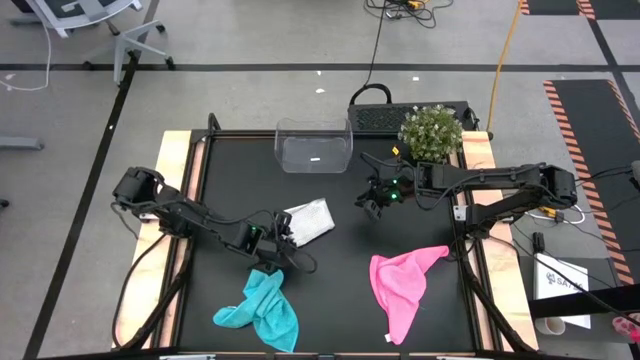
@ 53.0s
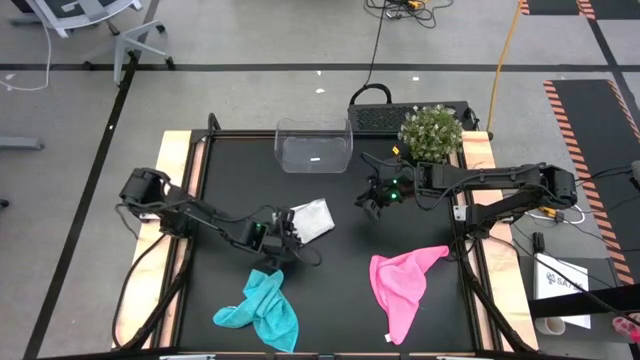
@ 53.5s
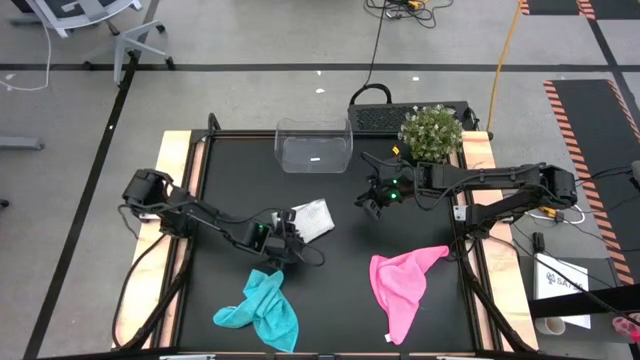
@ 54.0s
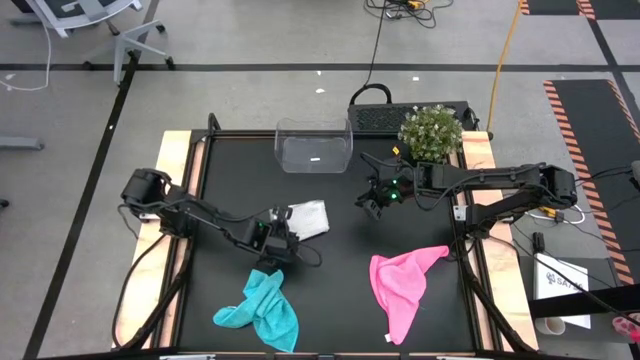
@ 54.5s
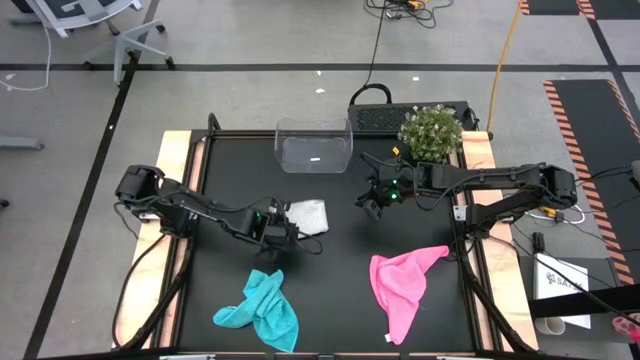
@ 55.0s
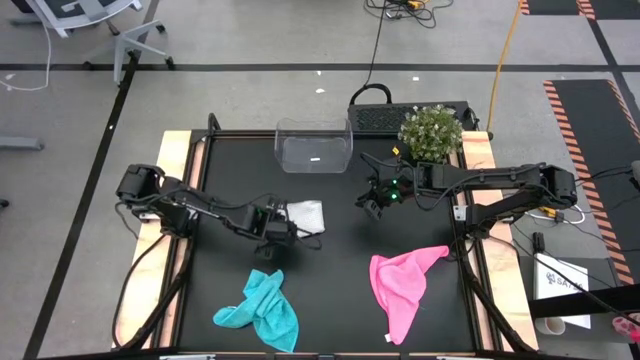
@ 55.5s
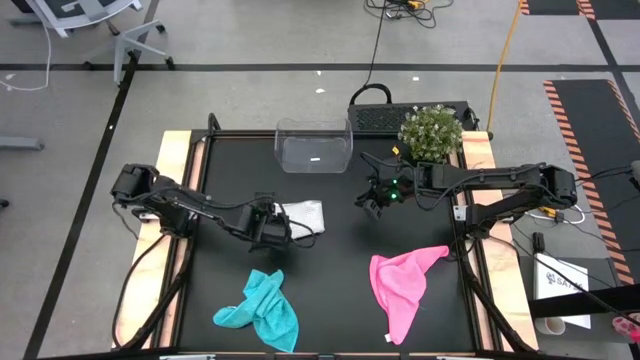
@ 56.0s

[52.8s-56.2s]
Task: Fold microfiber towels
Fold the gray microfiber cloth

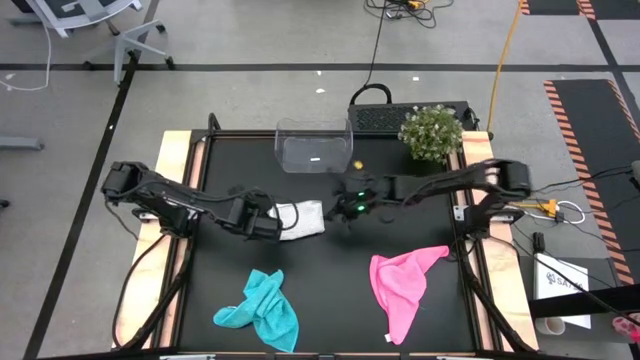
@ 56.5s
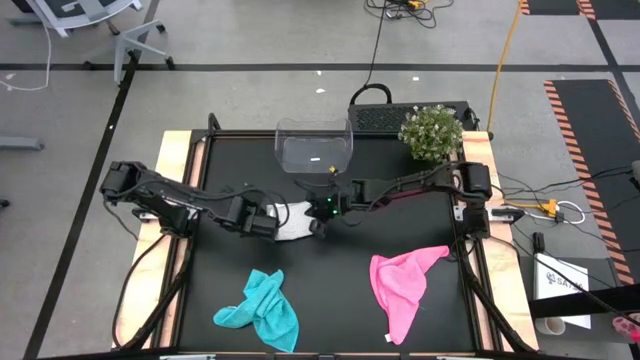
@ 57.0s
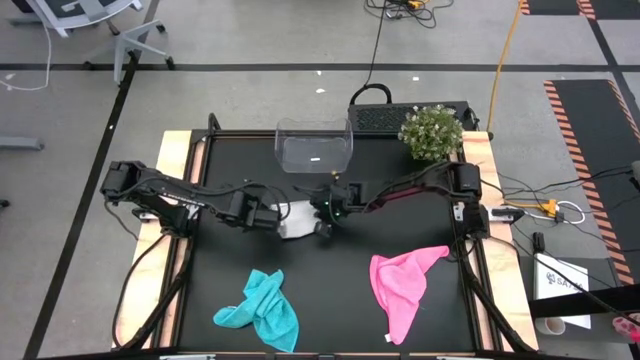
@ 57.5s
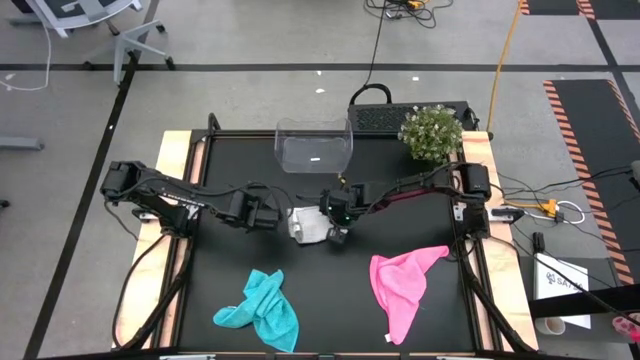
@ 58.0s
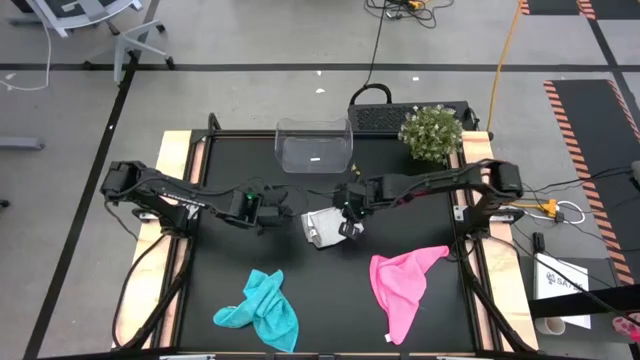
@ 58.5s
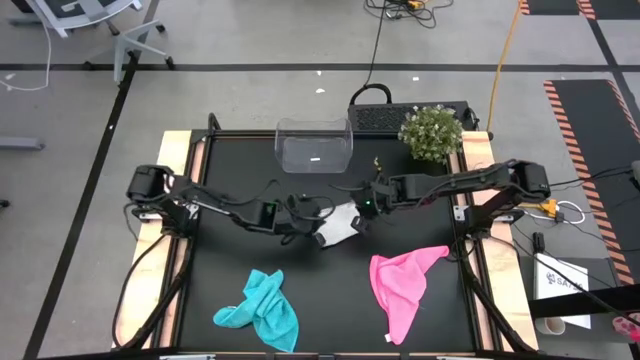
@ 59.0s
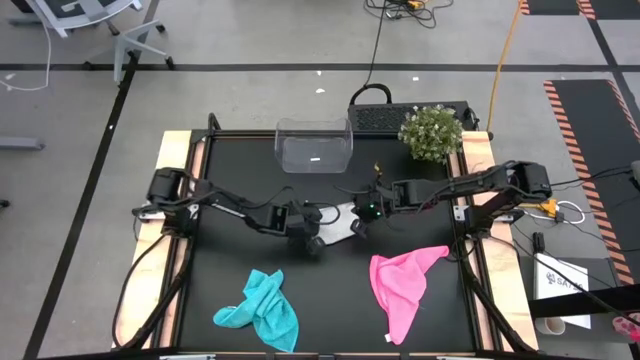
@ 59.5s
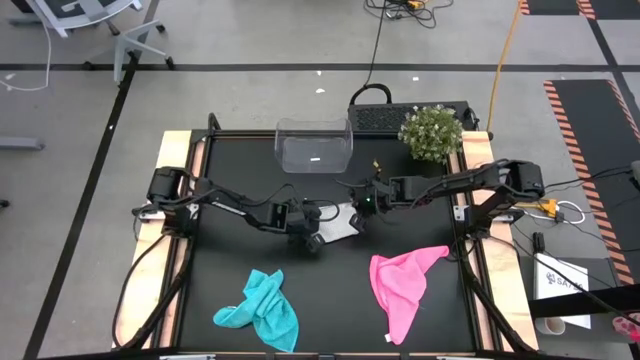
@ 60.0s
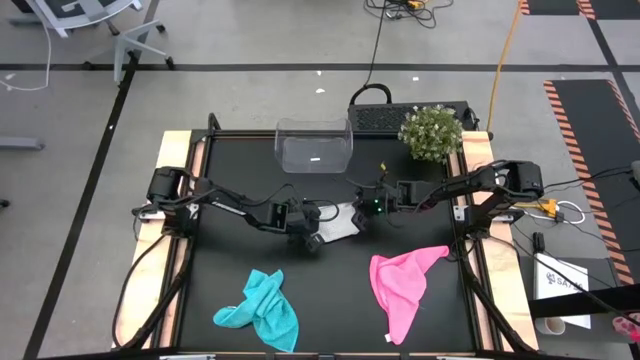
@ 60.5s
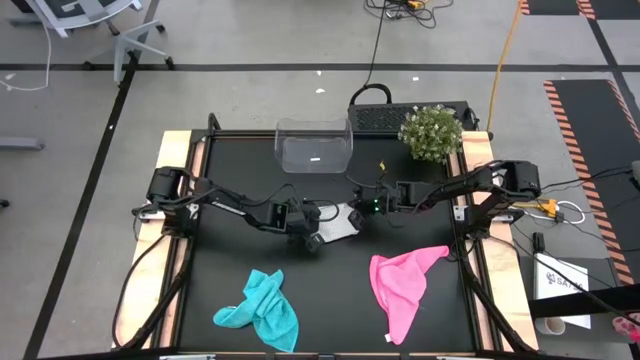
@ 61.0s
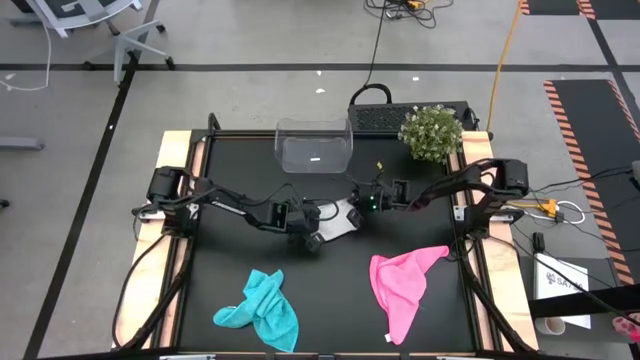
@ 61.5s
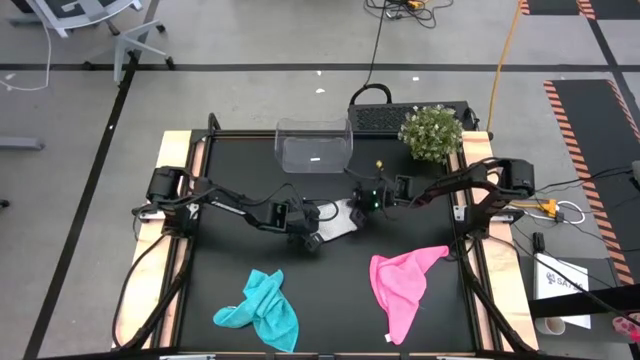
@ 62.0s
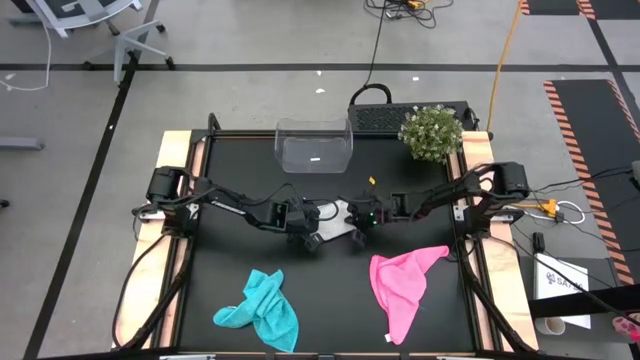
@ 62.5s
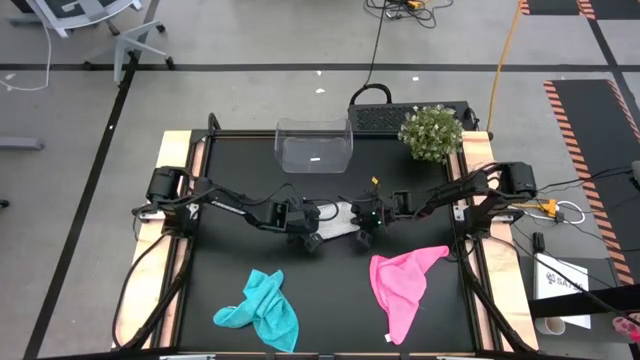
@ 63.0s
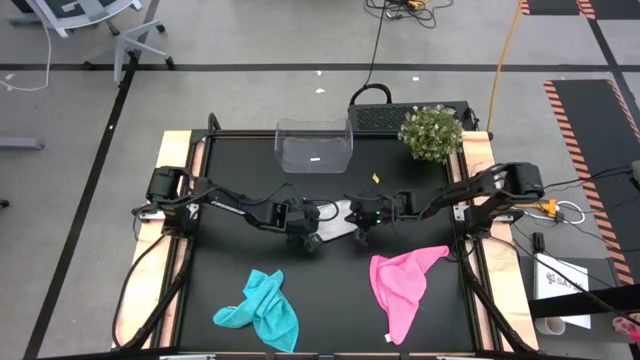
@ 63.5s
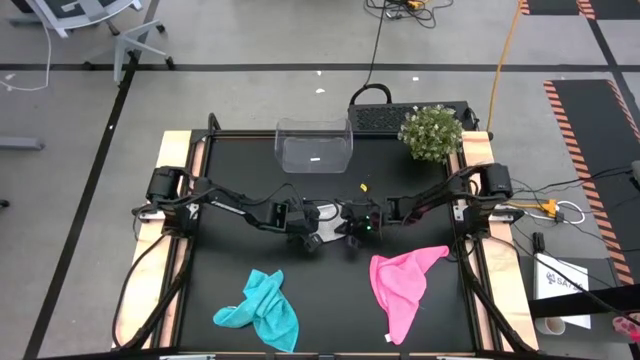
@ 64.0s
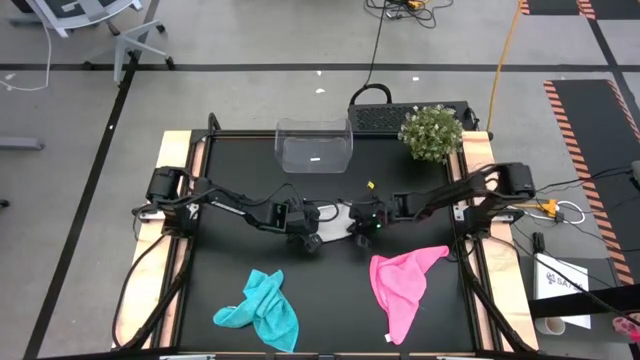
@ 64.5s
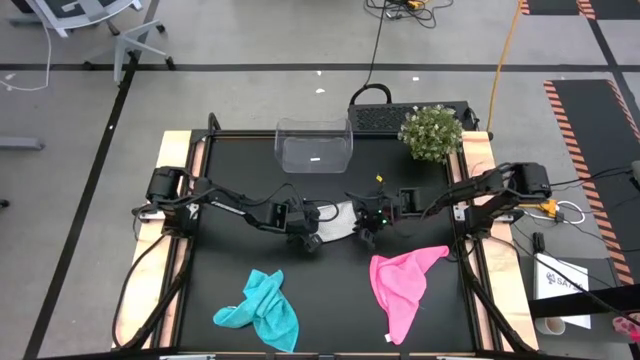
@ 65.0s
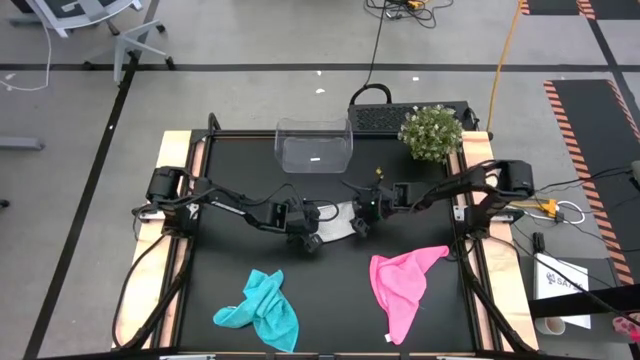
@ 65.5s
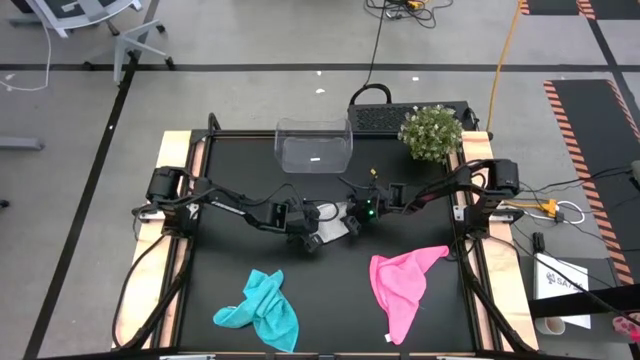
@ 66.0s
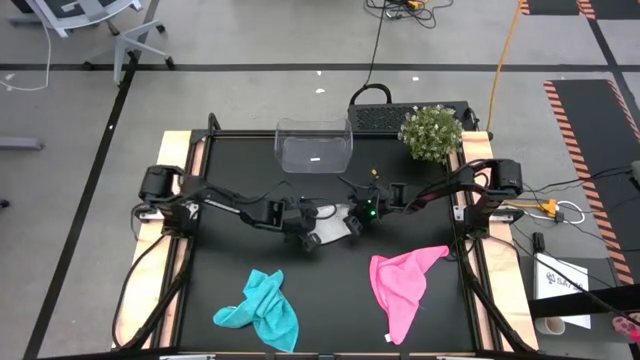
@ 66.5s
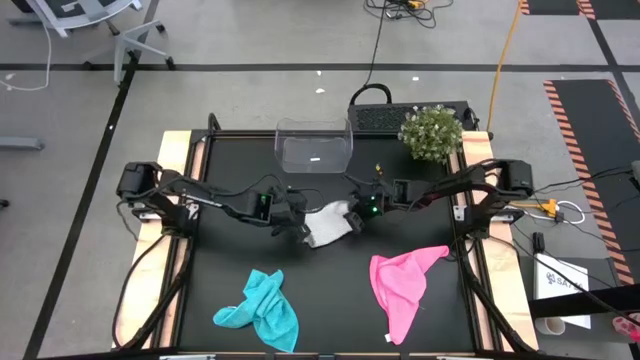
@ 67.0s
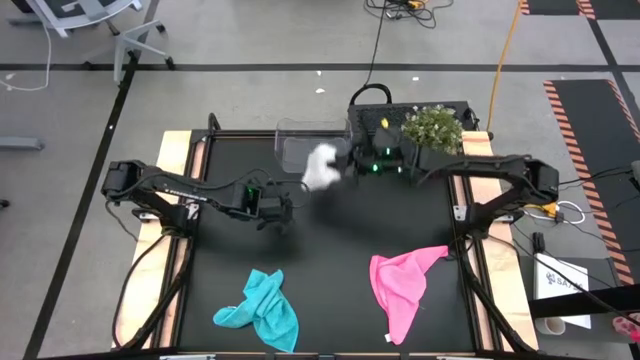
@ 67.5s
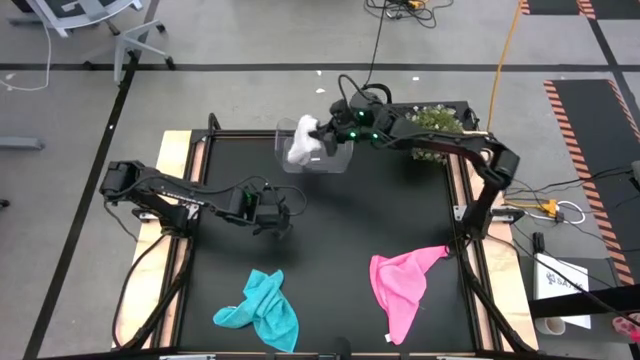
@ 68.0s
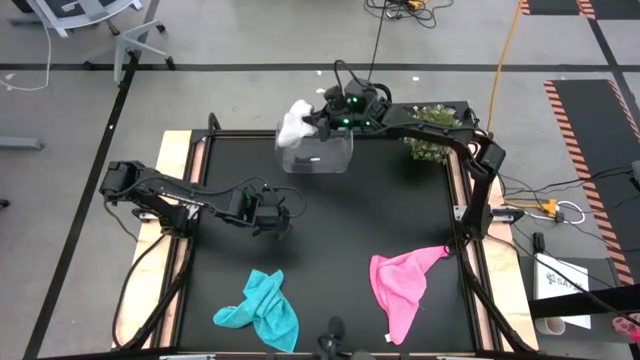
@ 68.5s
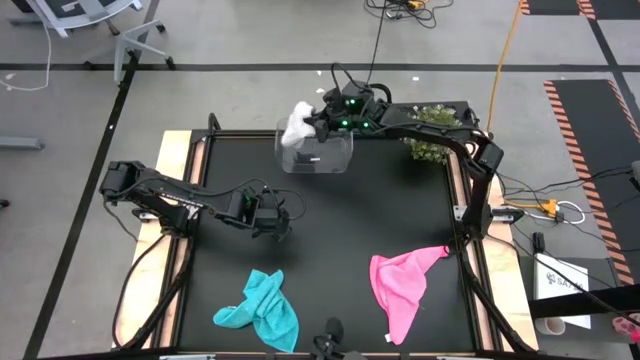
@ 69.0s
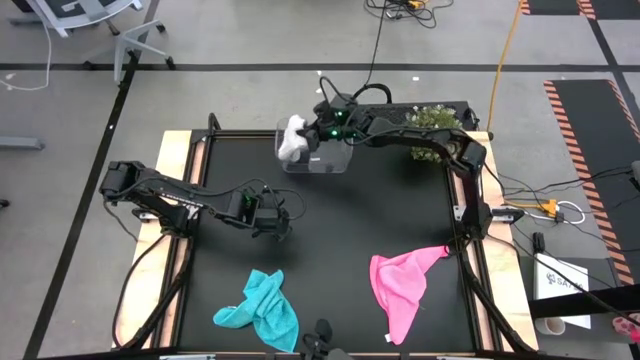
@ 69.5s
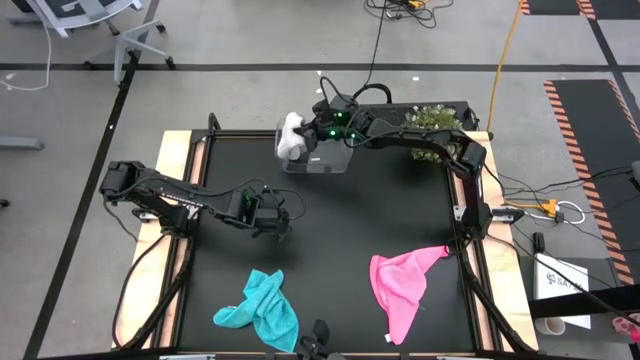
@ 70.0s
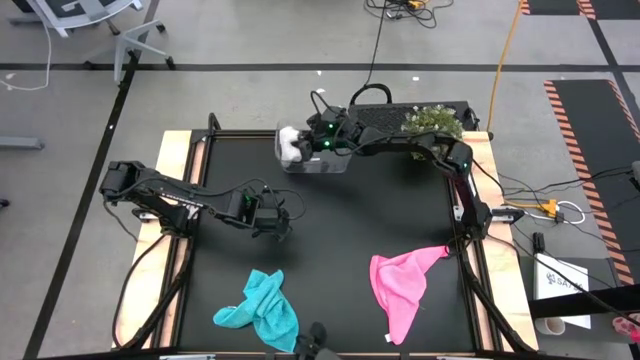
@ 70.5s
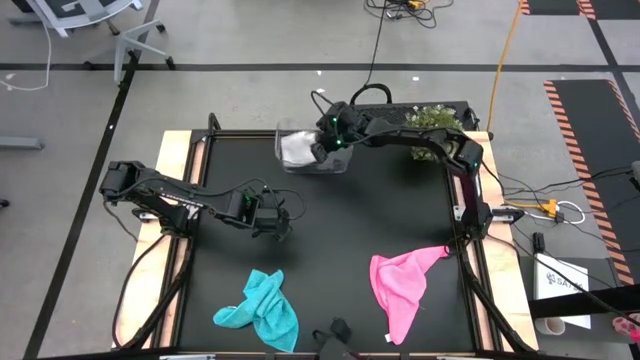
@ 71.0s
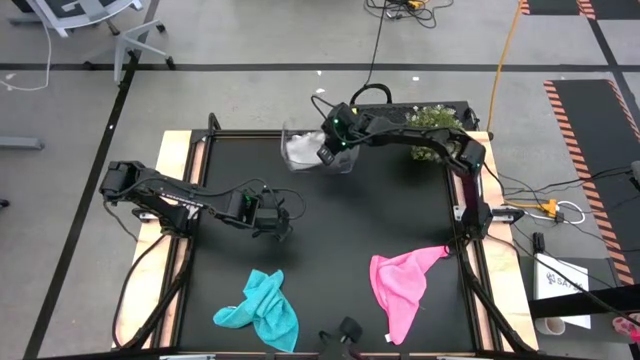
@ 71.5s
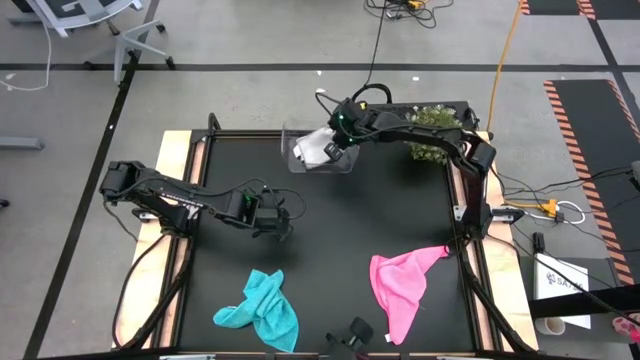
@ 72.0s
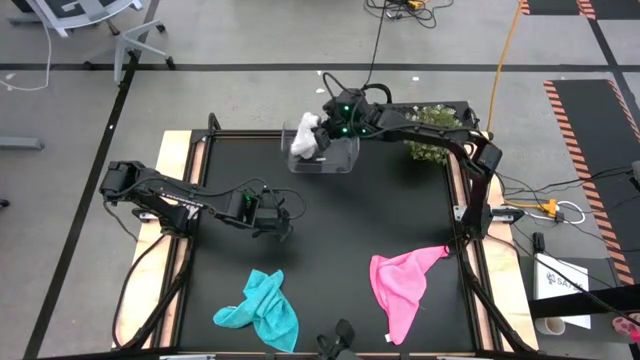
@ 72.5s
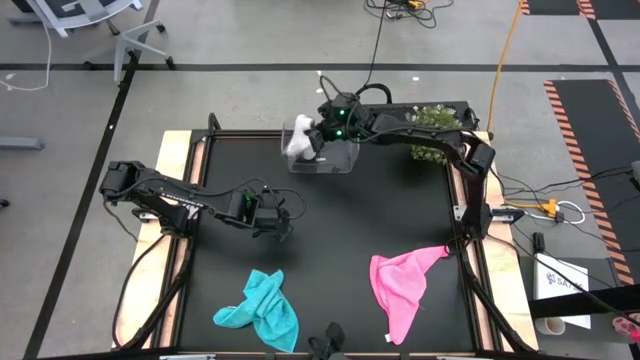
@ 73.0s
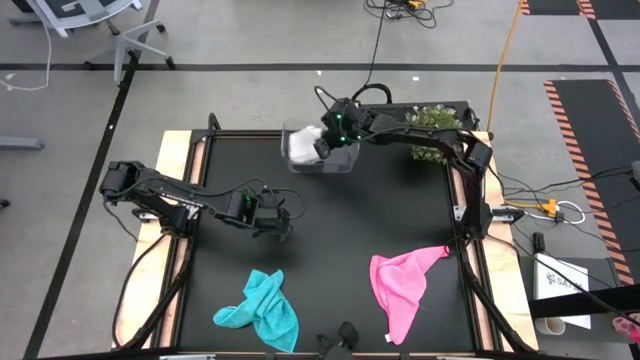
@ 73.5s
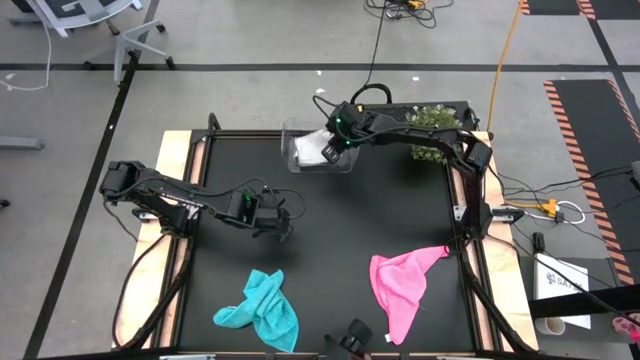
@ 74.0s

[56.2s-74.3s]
Put the gray microfiber cloth into the transparent bin

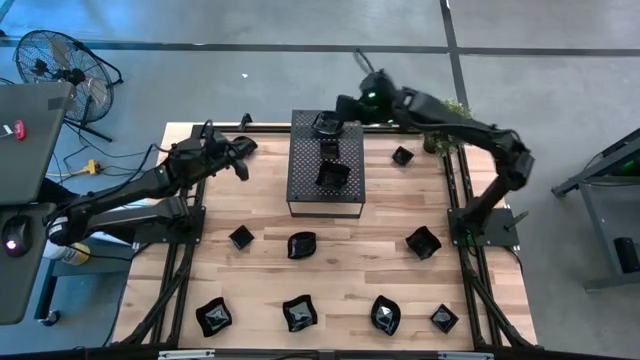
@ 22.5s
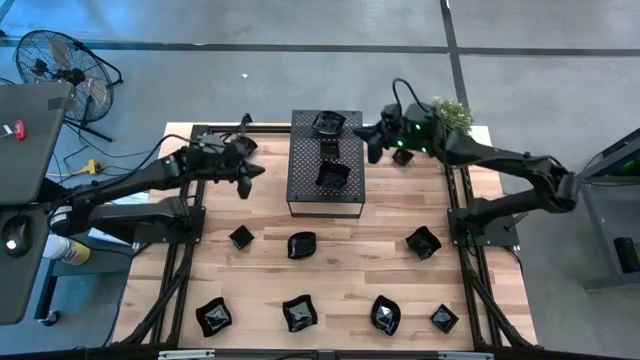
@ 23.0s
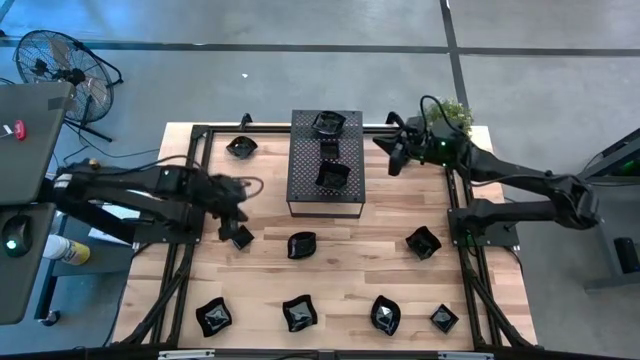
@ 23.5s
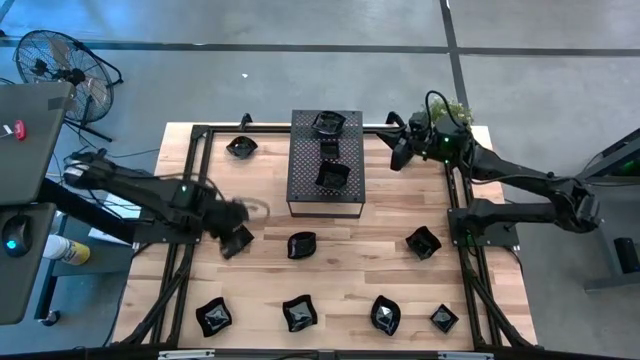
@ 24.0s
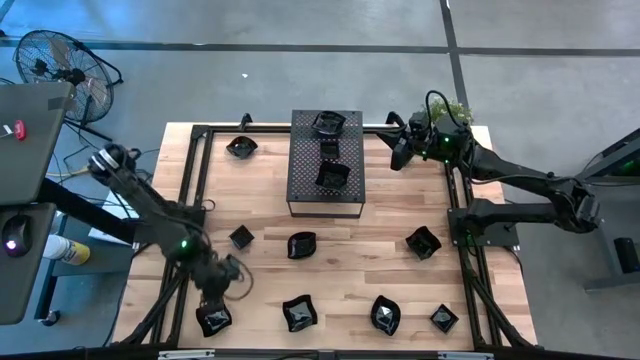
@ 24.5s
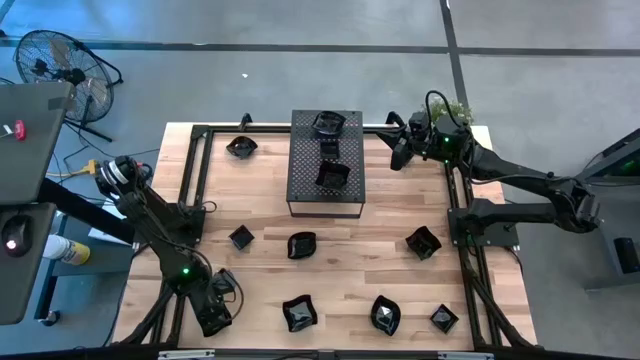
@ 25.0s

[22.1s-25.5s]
Task: Pick & Place Mini shaped plates
Stack the distorted square plate on top of the distorted square plate on the shelf
